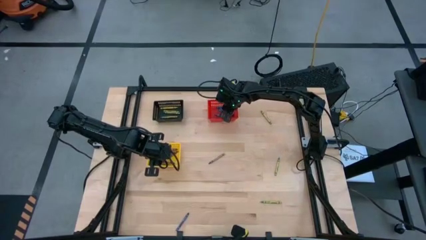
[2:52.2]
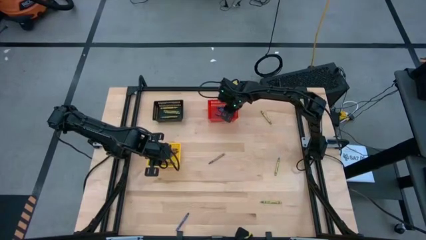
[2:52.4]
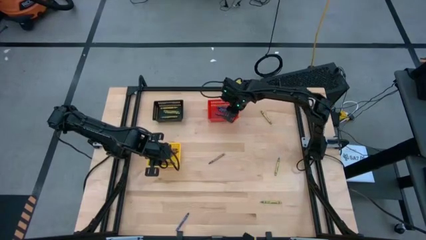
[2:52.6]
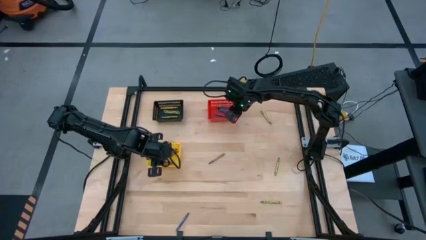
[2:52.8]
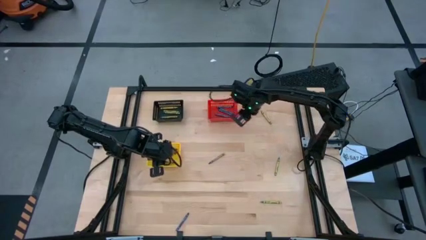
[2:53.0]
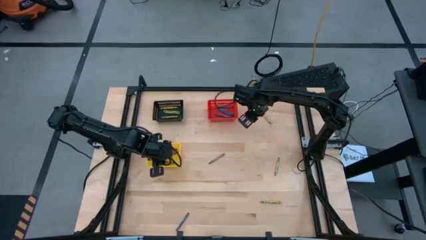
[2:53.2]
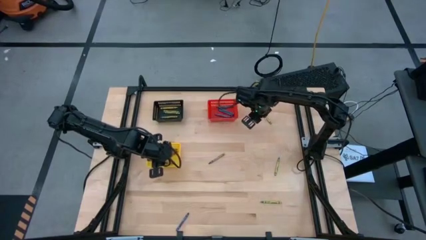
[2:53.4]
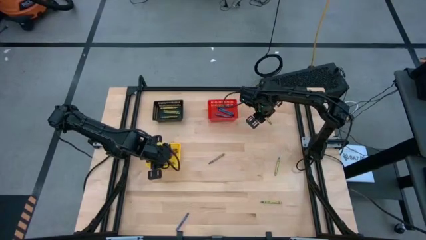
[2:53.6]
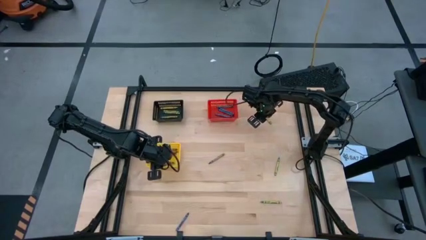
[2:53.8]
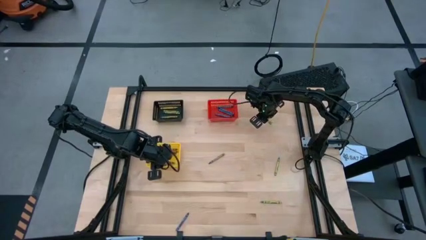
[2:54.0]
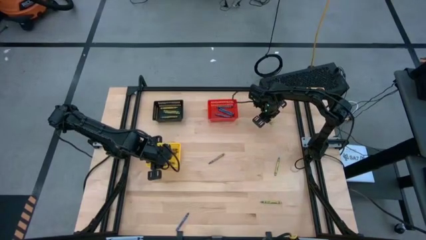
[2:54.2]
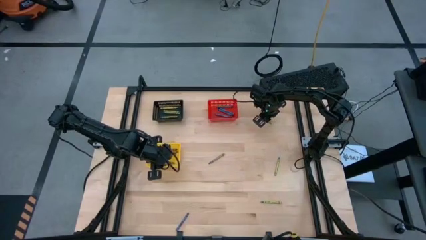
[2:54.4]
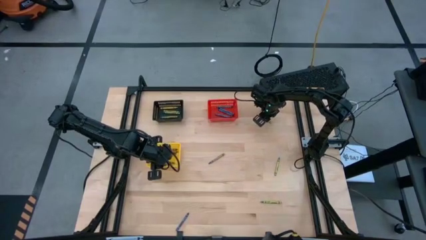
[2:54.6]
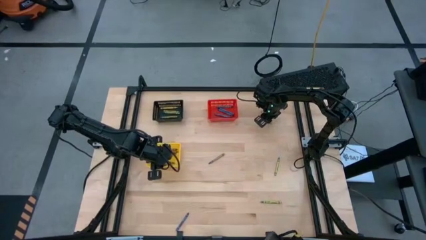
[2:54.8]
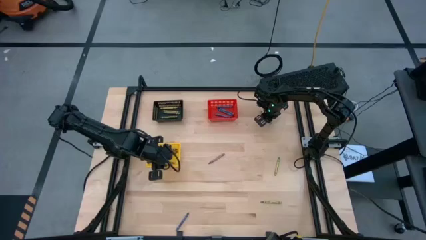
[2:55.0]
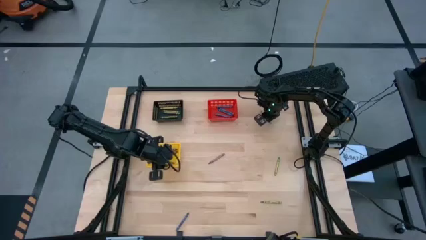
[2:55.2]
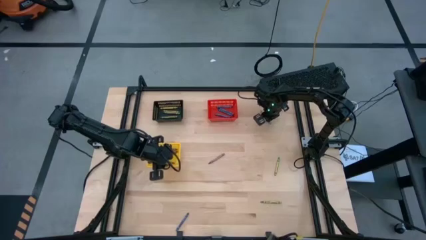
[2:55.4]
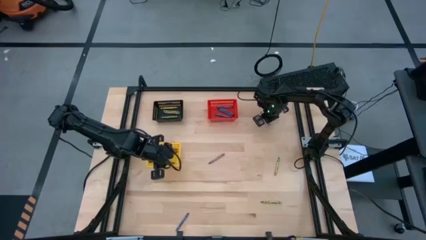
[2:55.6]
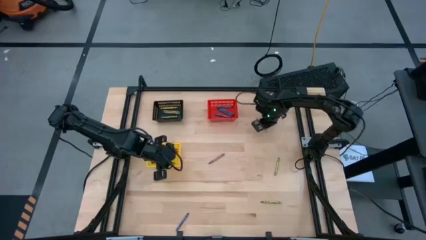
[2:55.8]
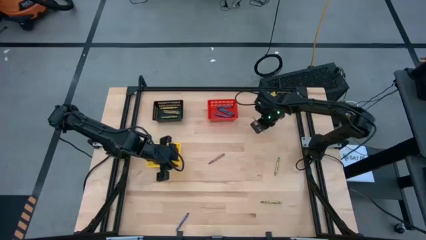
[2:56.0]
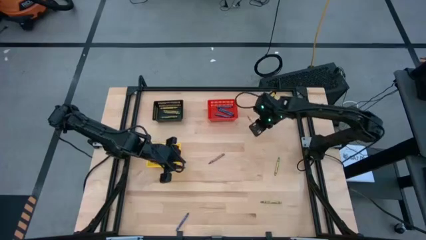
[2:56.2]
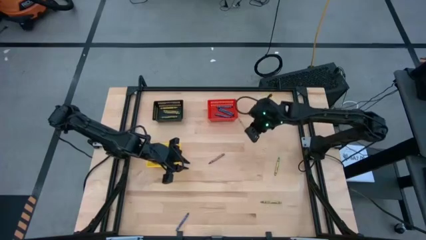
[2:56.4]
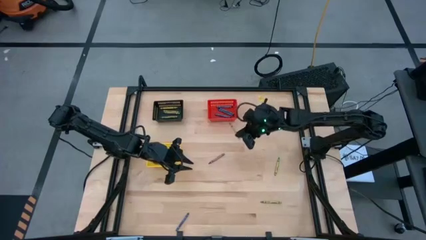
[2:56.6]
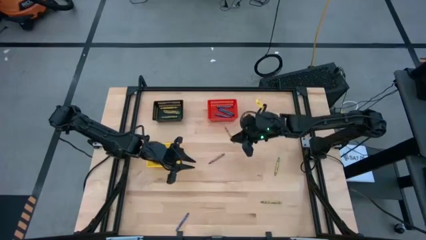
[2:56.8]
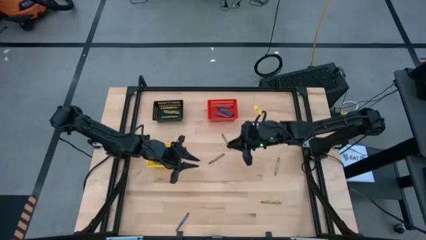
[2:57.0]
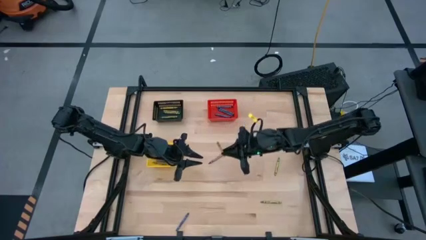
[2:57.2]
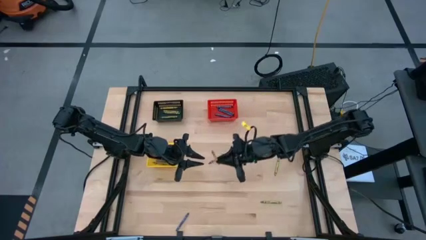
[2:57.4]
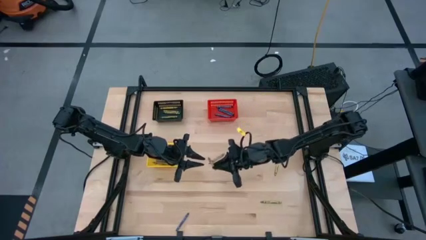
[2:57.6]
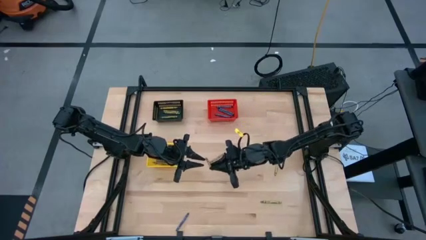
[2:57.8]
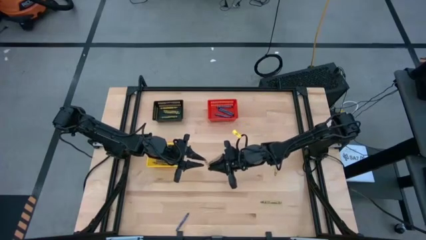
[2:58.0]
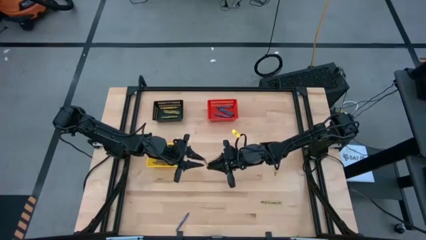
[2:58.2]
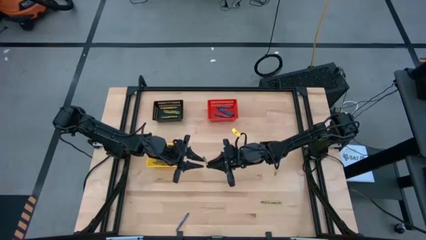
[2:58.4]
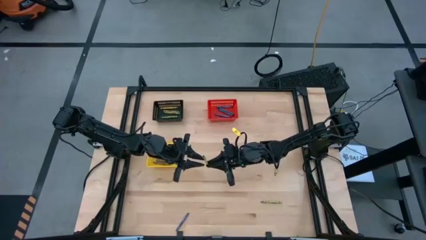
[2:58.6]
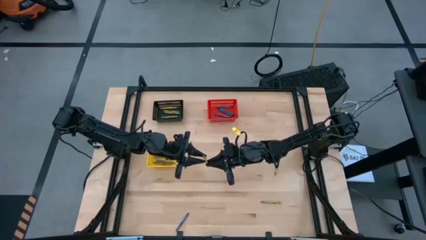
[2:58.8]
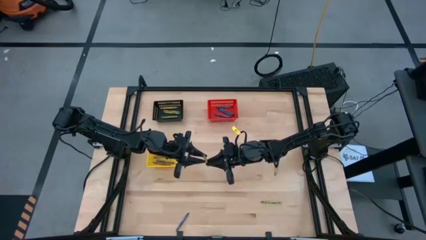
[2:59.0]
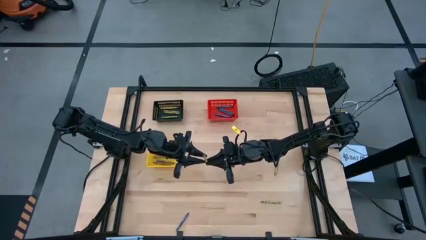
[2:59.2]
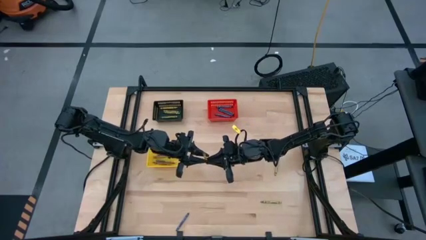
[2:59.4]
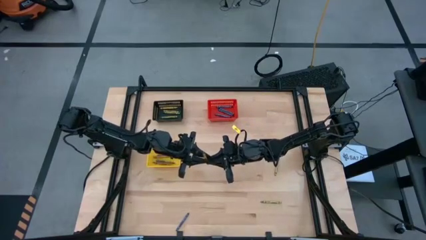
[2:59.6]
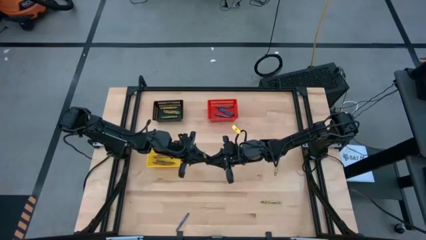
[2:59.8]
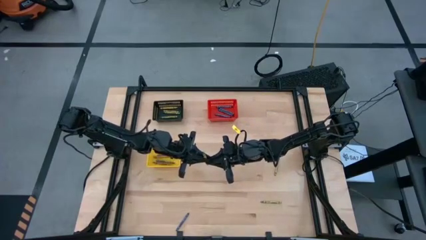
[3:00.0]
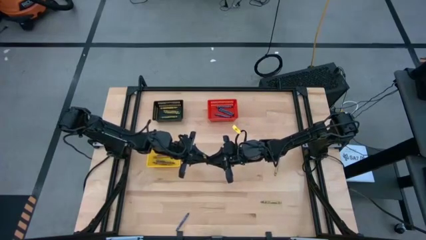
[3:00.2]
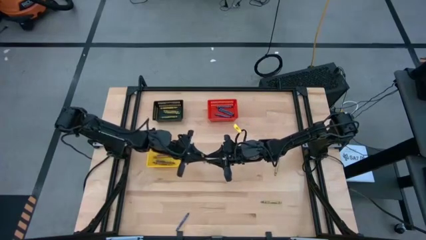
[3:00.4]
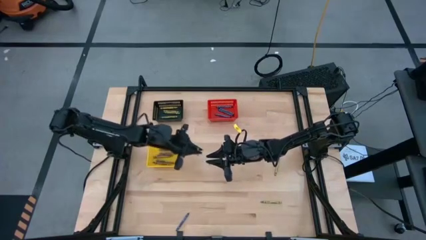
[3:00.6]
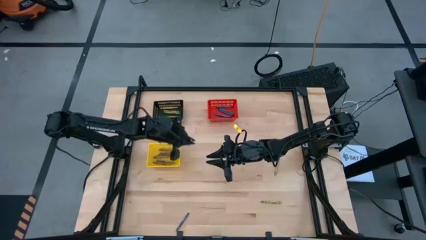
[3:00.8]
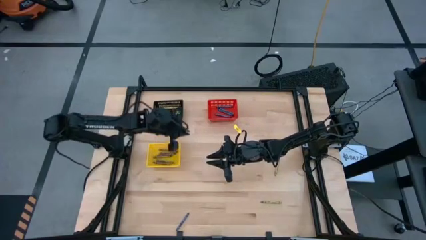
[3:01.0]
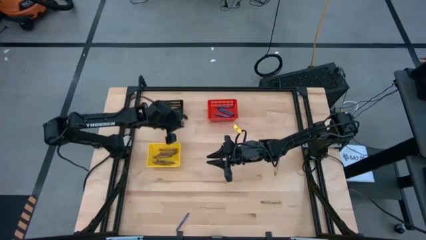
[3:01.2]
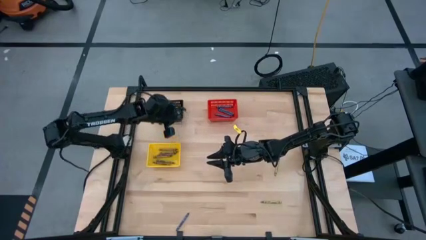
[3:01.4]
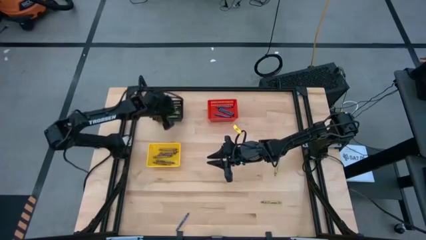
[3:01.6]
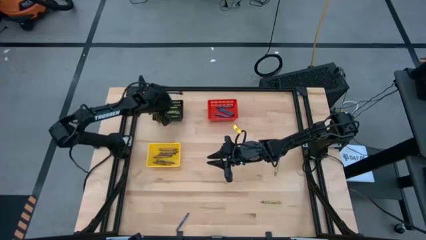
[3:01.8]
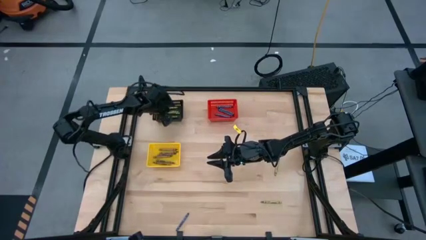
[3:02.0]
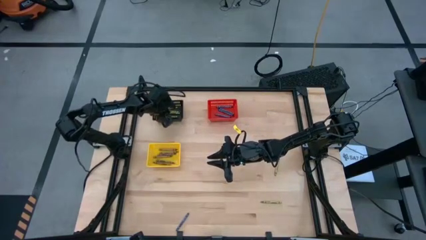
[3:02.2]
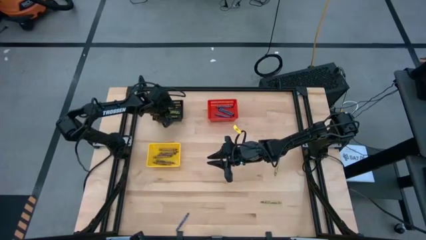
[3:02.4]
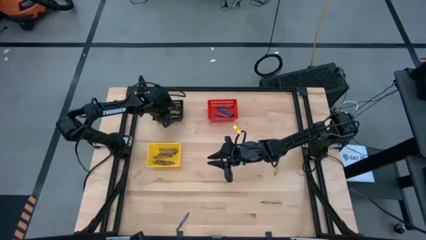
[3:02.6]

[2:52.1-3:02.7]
Task: Sort crayons
Put the green crayon into the black basket

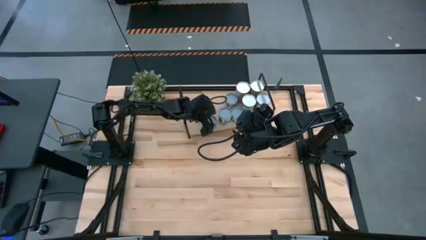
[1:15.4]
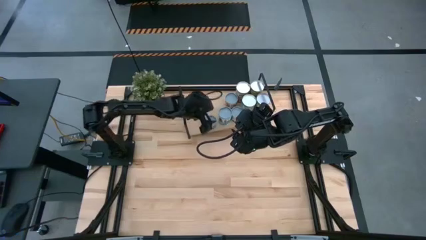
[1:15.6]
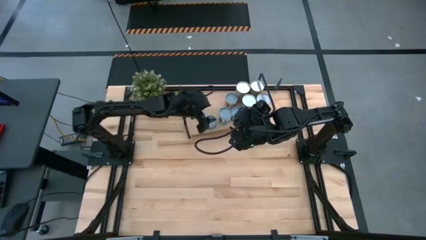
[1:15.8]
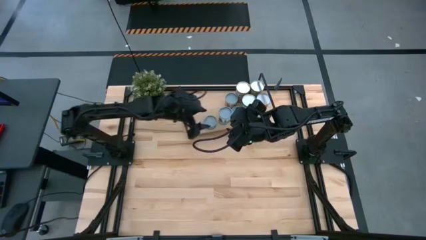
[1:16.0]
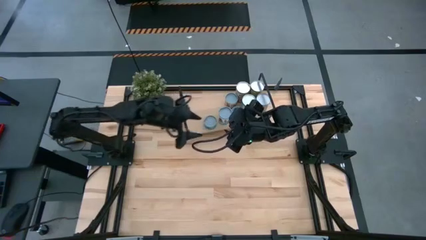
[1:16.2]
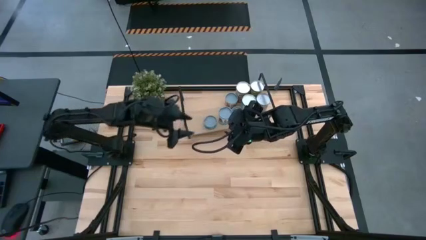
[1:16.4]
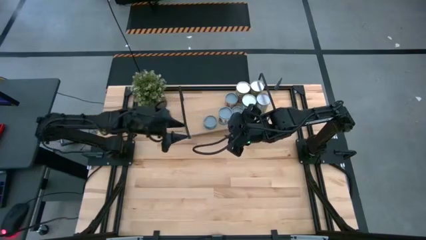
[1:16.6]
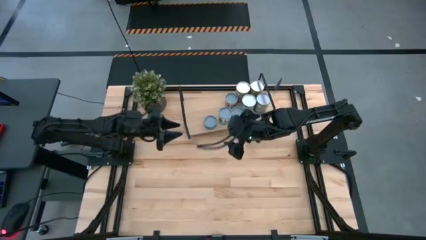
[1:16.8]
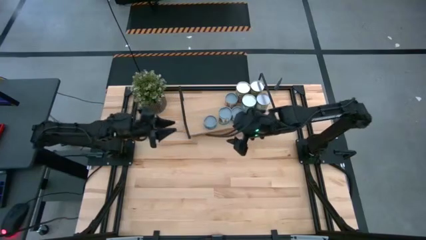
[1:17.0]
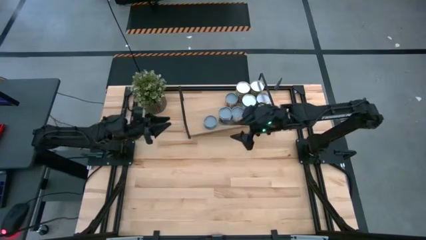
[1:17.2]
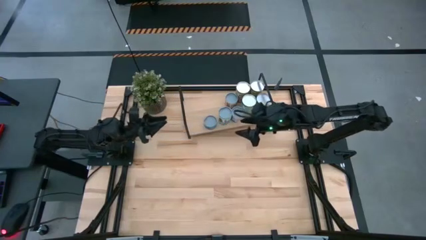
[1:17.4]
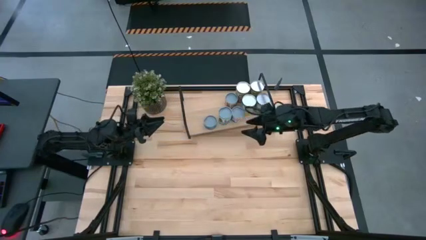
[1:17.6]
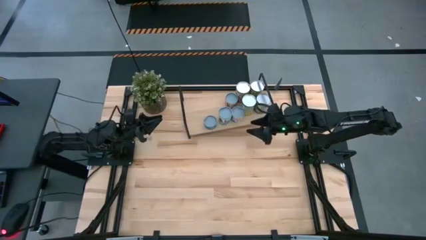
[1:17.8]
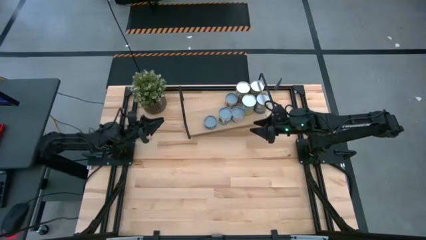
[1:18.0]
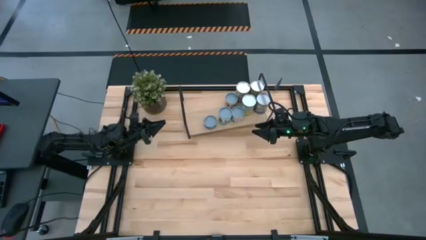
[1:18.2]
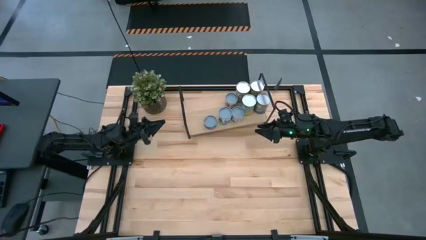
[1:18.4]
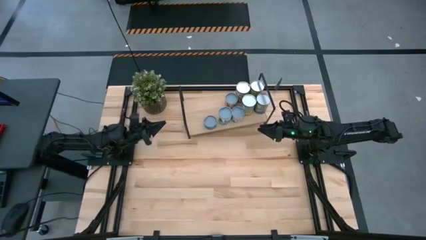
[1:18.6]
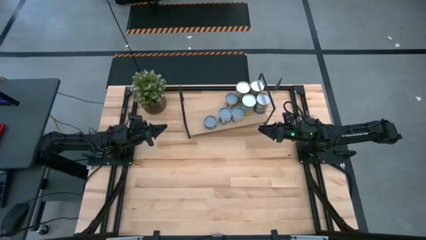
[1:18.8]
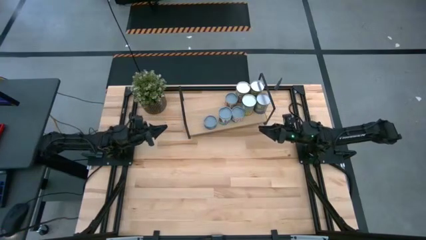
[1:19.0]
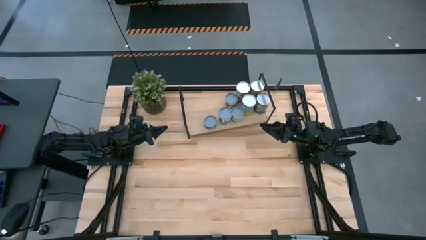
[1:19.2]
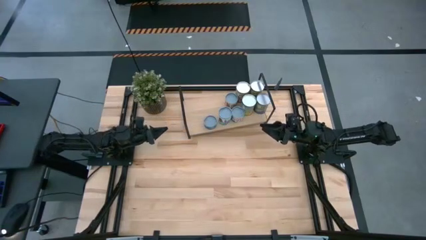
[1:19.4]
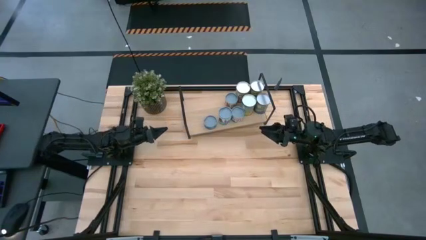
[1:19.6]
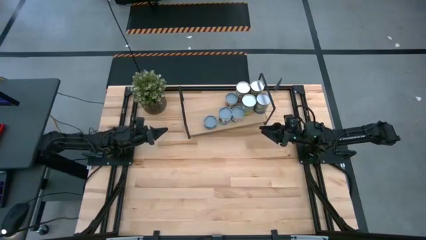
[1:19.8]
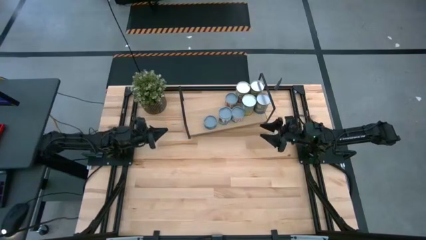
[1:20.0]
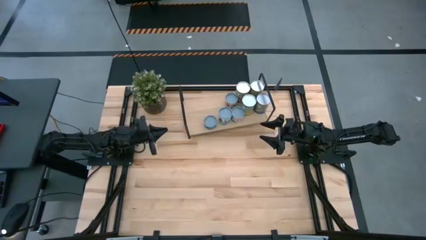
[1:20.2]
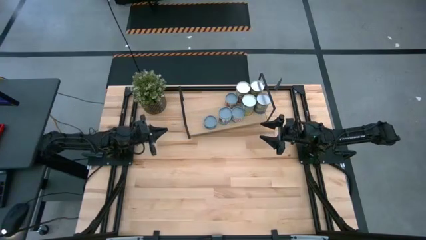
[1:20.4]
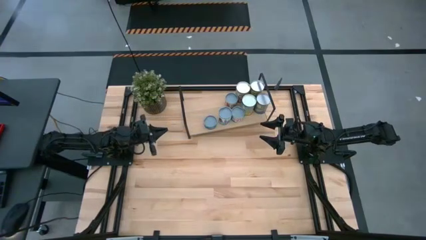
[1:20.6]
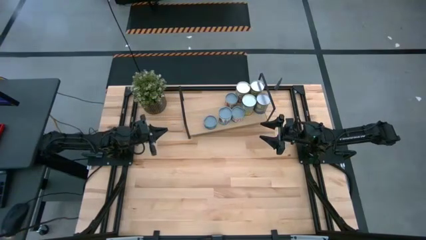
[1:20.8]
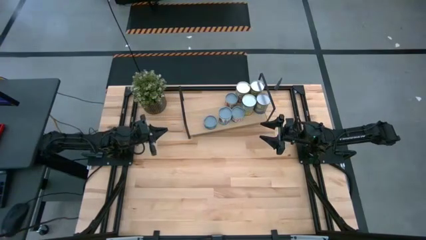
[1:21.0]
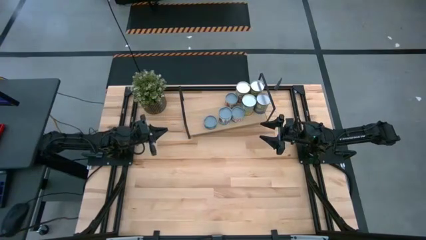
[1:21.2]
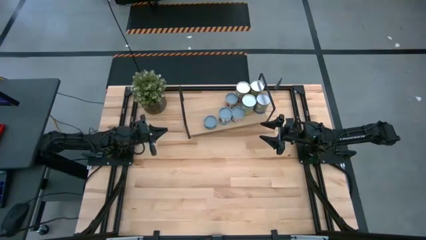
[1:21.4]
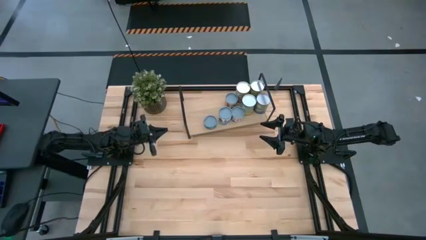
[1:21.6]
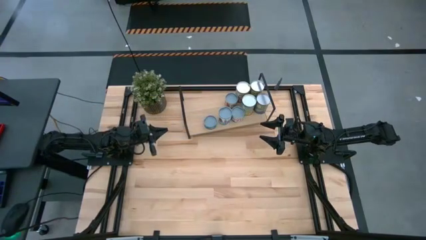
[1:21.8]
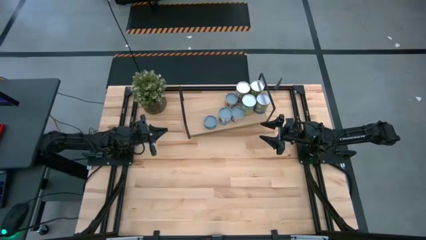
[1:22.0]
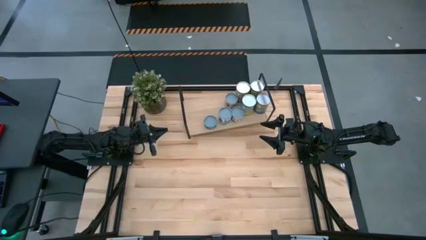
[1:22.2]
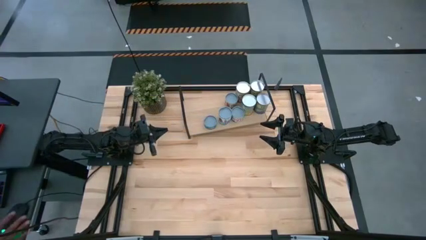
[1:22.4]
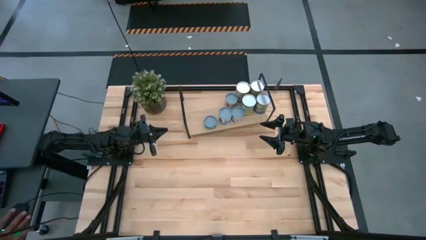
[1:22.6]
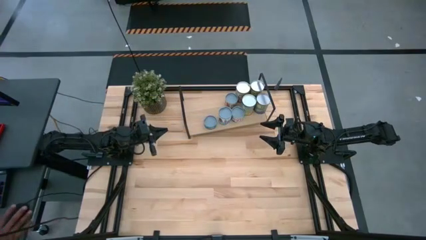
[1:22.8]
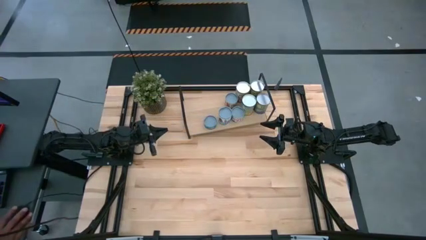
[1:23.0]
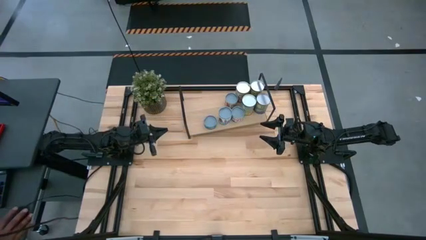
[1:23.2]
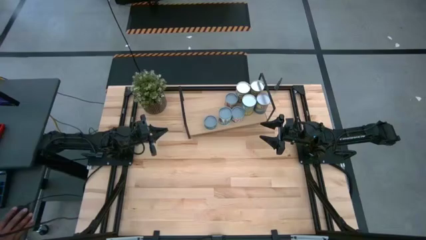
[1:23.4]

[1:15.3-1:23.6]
Task: Pick and place cans onto a shelf
Return to Home Position
